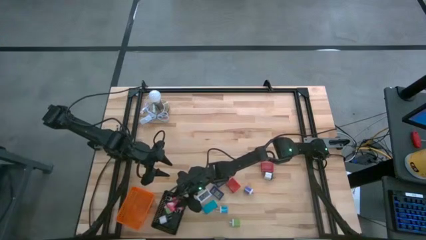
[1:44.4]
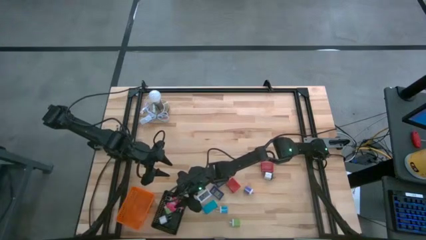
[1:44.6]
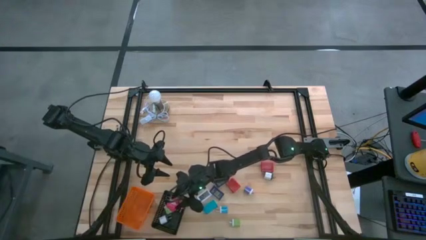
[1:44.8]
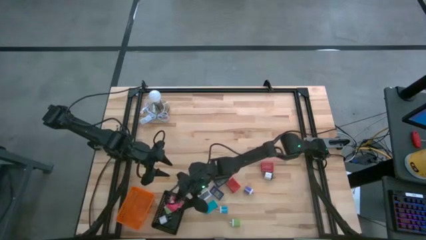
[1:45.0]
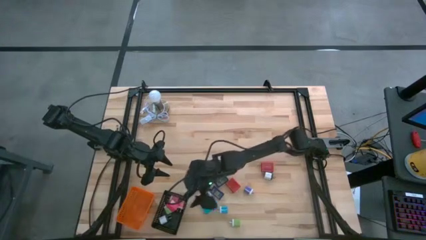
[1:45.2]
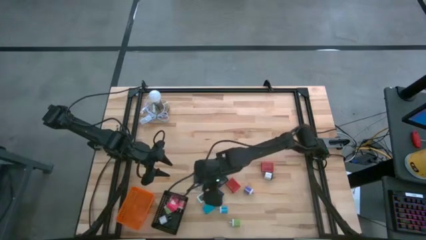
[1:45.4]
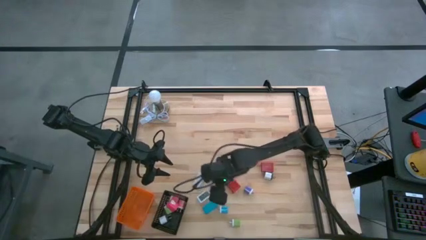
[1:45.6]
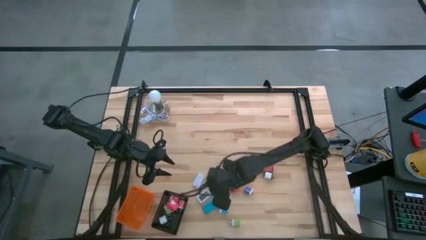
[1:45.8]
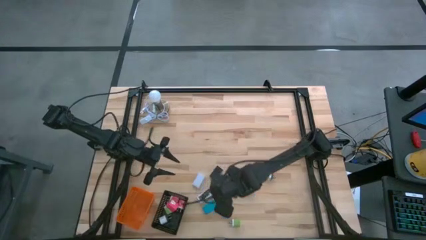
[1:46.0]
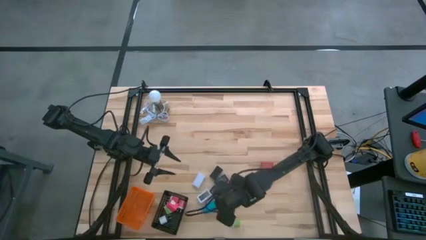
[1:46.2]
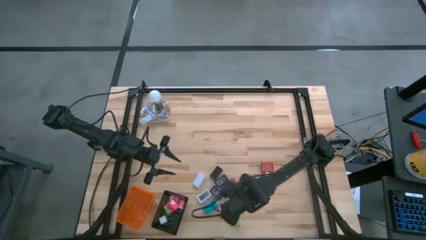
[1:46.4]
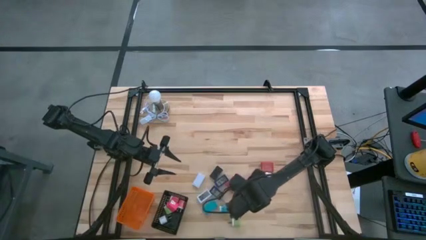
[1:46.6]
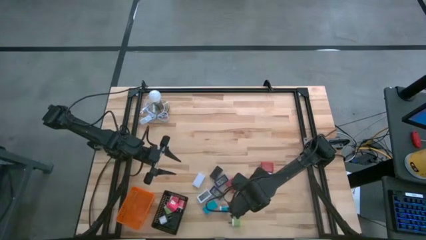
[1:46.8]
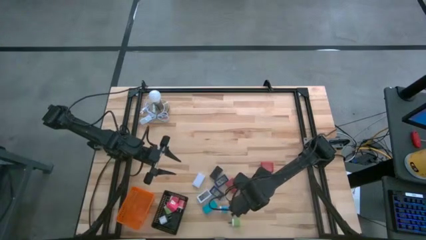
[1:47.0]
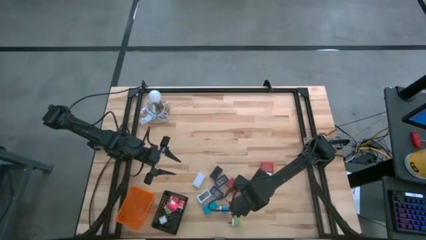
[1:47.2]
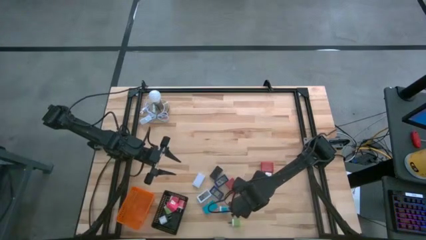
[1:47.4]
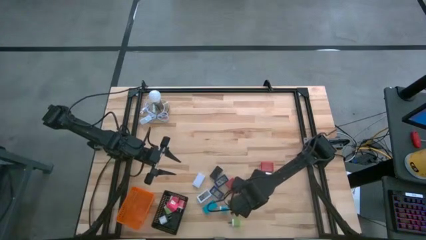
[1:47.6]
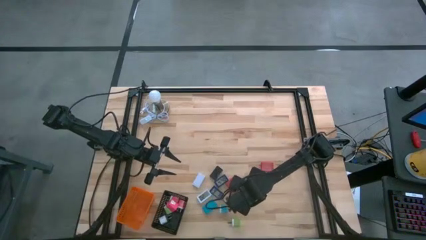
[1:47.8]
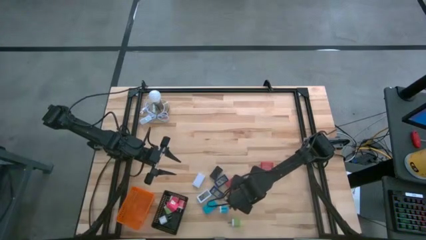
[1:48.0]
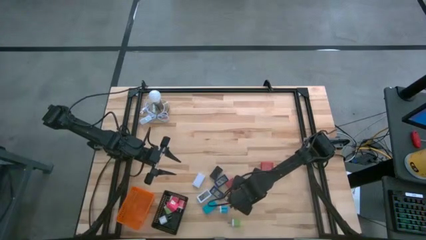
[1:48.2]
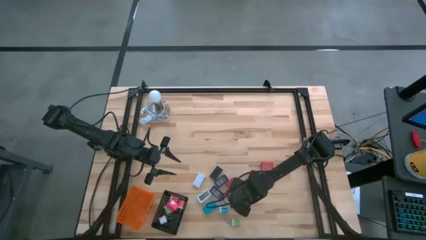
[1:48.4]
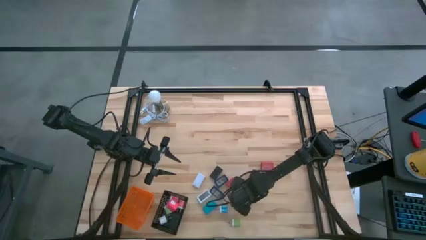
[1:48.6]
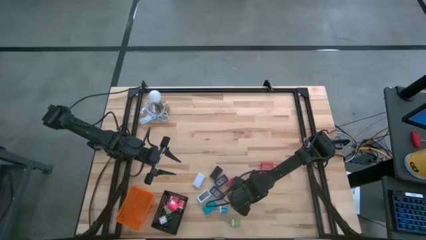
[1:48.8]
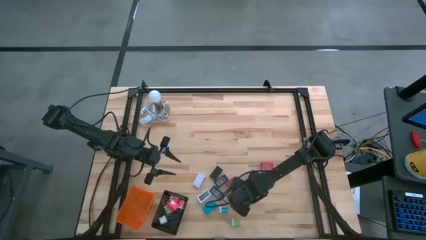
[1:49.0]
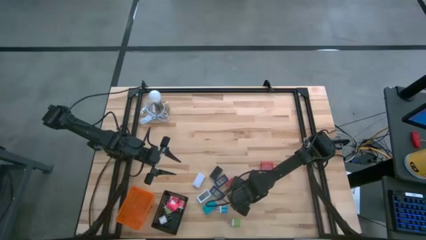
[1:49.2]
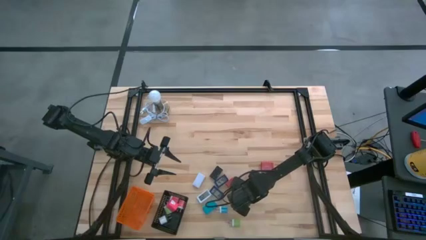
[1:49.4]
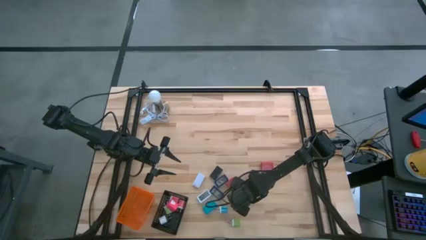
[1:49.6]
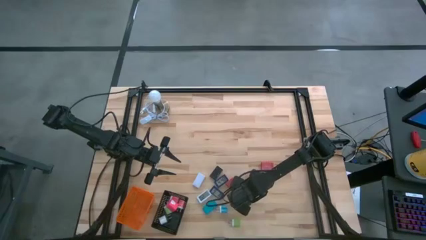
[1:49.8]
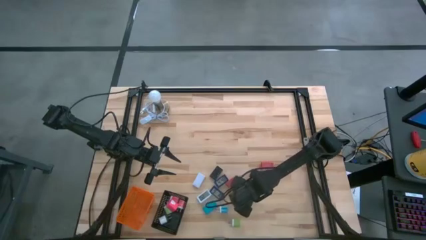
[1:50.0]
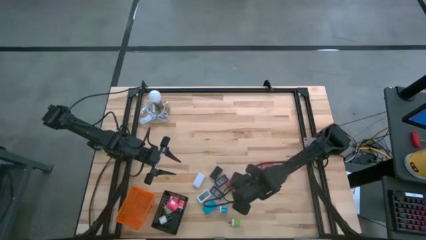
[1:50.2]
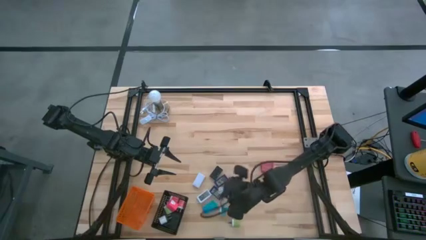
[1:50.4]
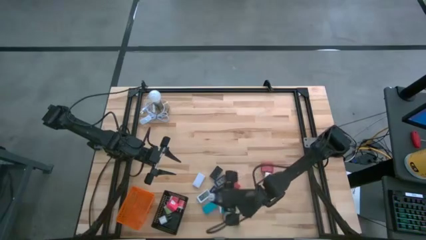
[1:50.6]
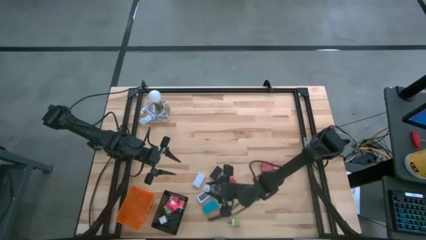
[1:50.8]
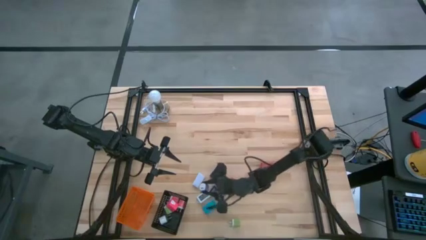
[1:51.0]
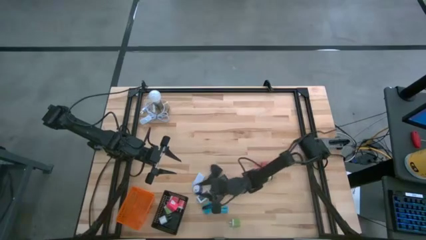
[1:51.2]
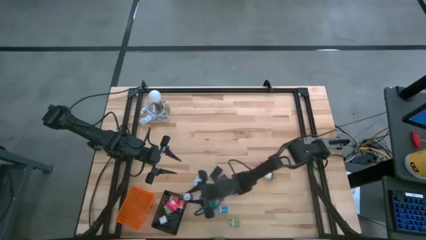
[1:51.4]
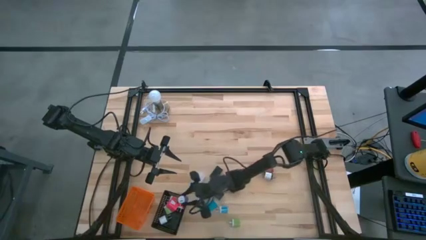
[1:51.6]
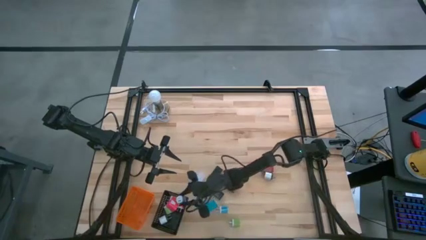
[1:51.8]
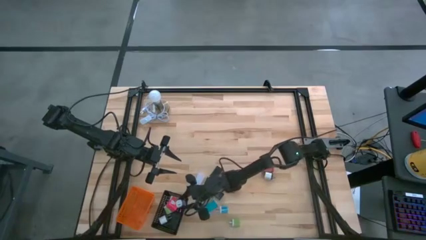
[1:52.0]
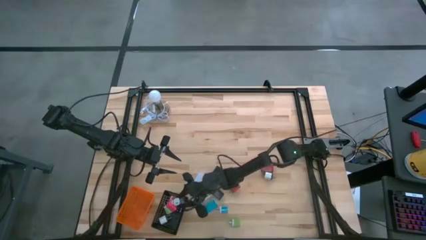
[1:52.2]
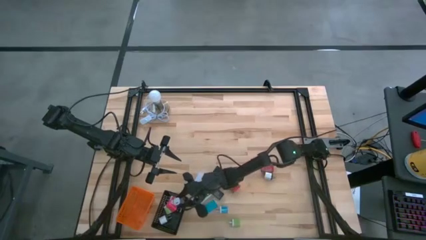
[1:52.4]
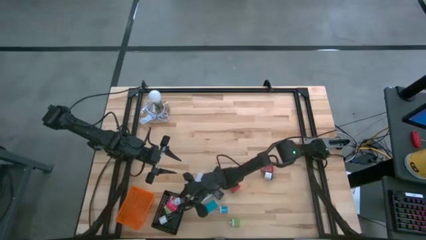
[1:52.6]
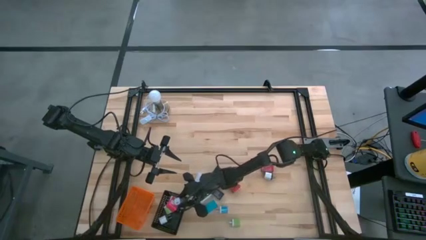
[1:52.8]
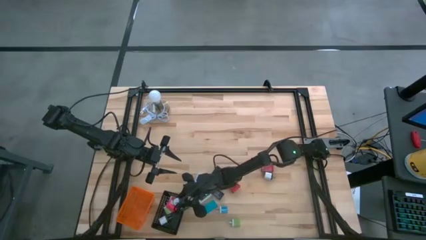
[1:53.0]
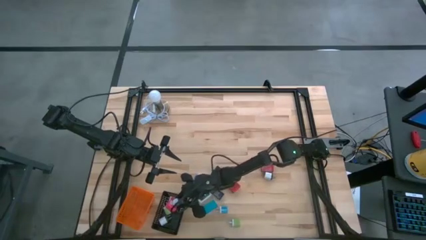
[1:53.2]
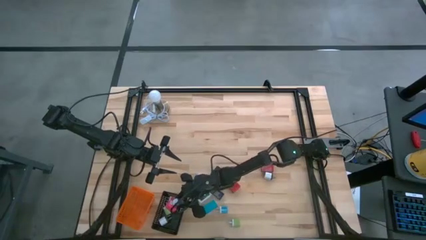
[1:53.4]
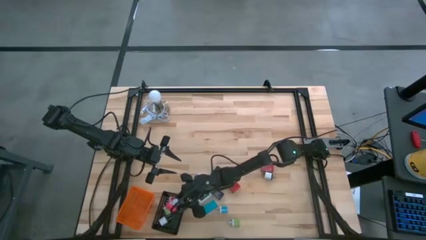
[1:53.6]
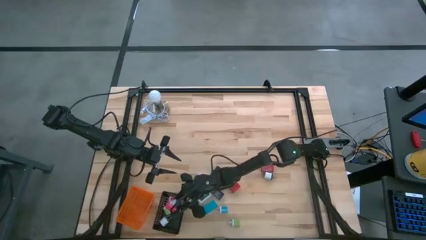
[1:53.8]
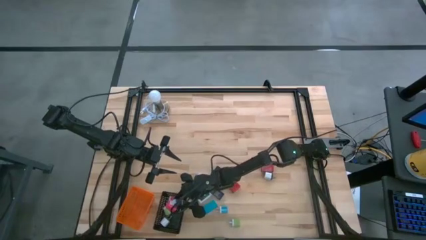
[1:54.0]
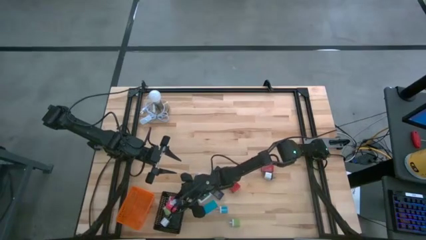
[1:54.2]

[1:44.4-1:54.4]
Task: Pick & Place Office items
Put the purple charger adapter into the black basket

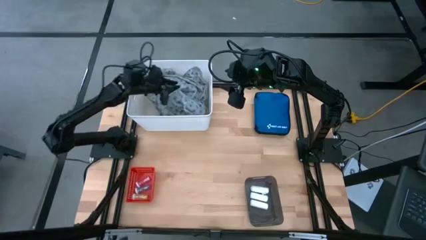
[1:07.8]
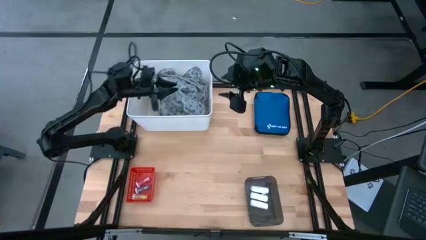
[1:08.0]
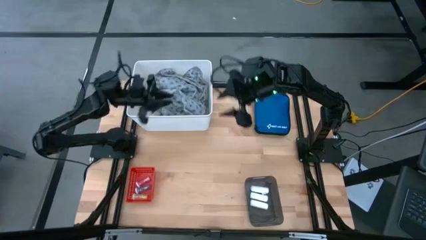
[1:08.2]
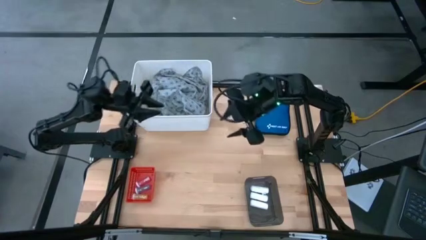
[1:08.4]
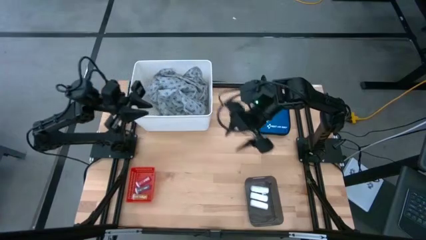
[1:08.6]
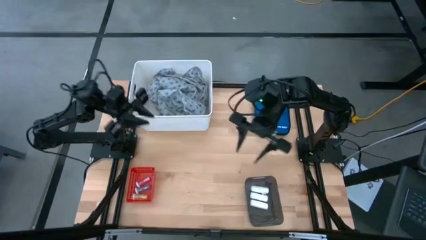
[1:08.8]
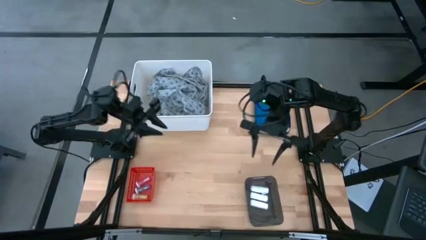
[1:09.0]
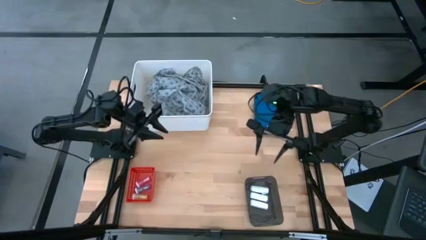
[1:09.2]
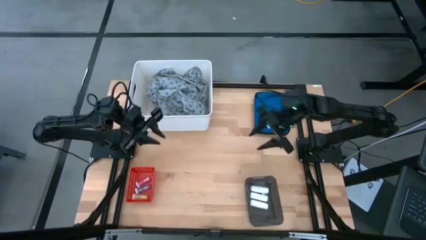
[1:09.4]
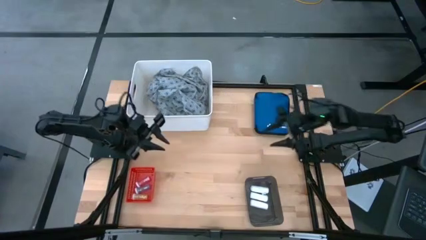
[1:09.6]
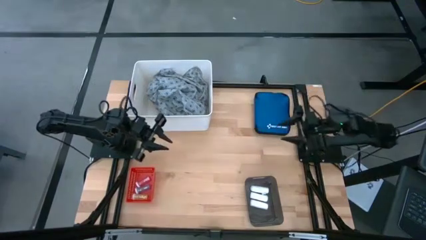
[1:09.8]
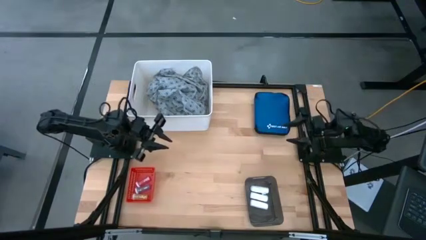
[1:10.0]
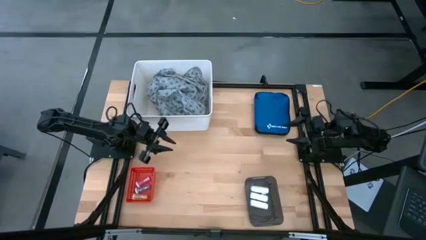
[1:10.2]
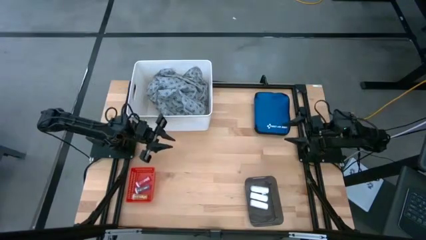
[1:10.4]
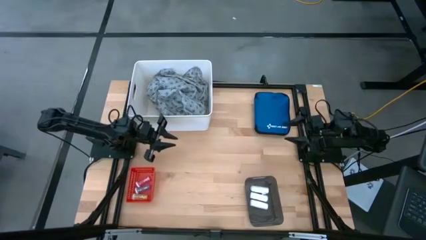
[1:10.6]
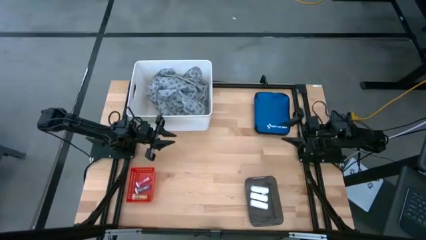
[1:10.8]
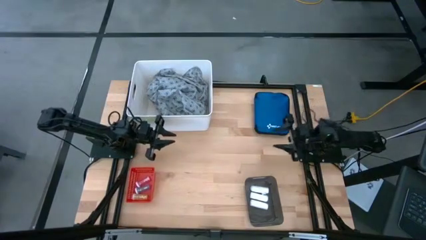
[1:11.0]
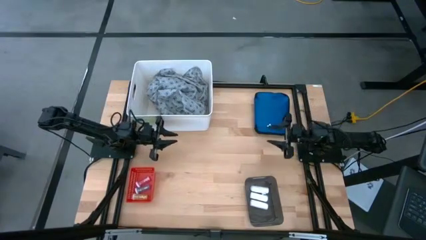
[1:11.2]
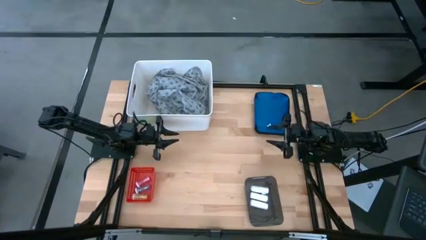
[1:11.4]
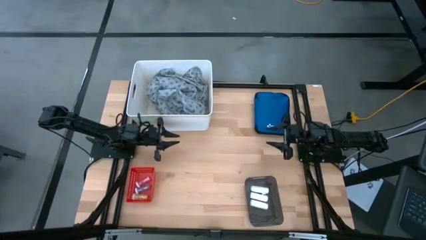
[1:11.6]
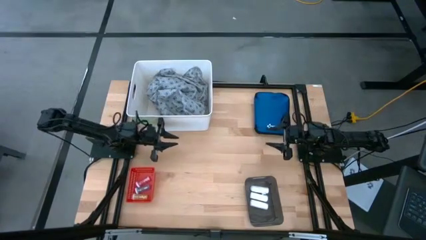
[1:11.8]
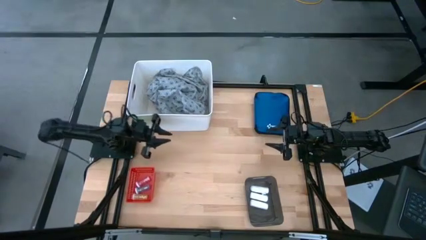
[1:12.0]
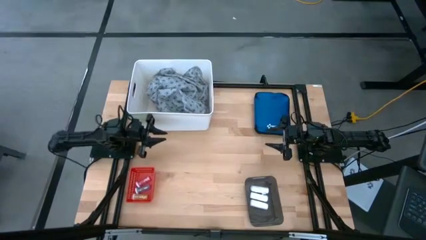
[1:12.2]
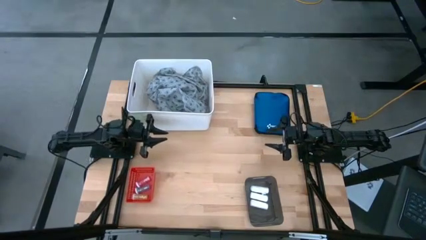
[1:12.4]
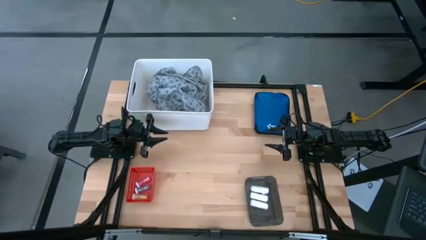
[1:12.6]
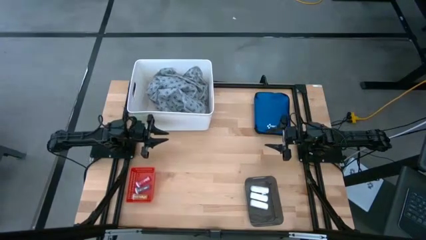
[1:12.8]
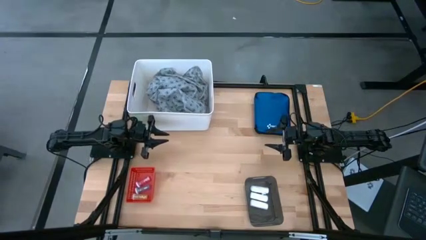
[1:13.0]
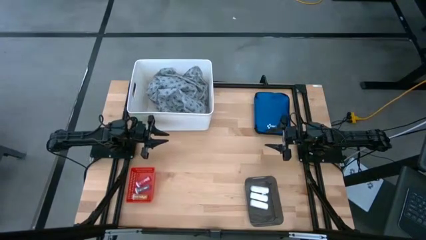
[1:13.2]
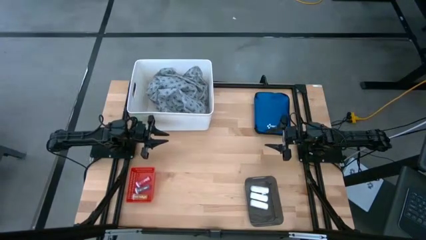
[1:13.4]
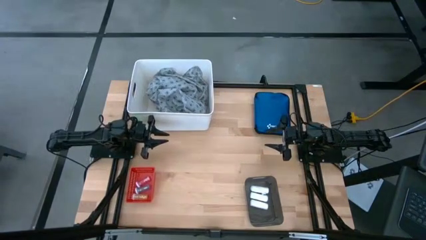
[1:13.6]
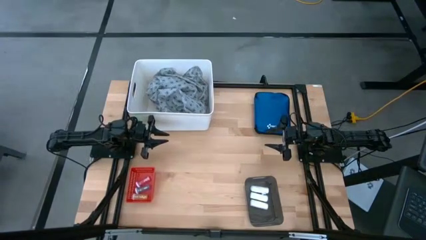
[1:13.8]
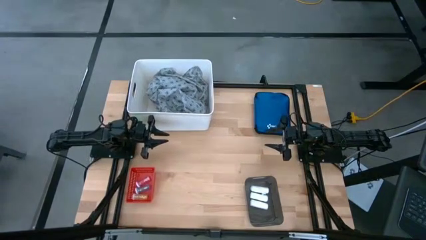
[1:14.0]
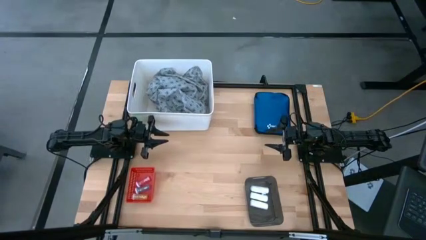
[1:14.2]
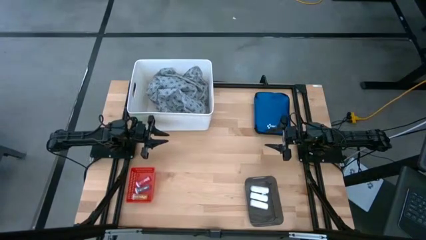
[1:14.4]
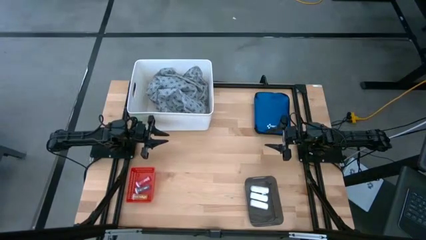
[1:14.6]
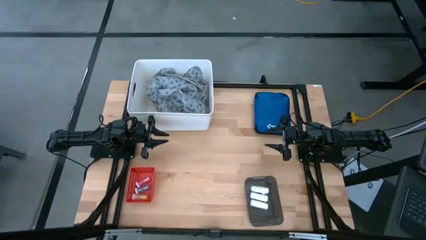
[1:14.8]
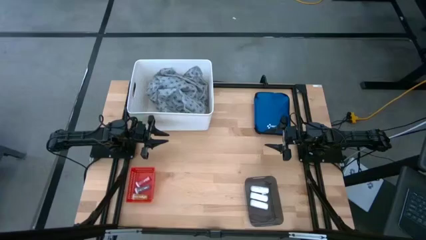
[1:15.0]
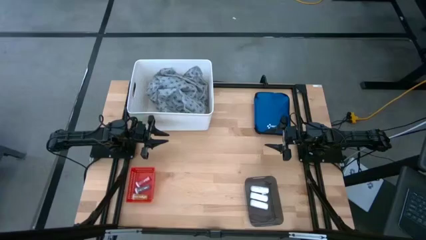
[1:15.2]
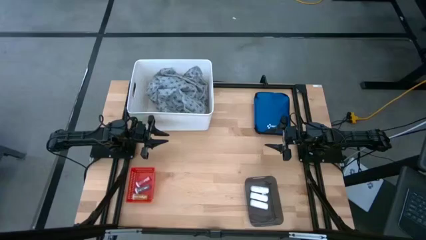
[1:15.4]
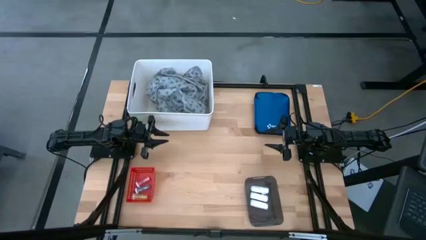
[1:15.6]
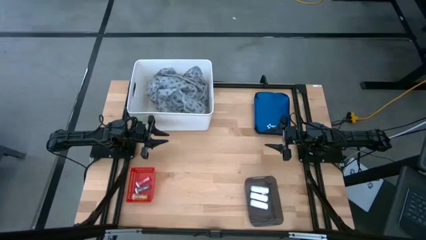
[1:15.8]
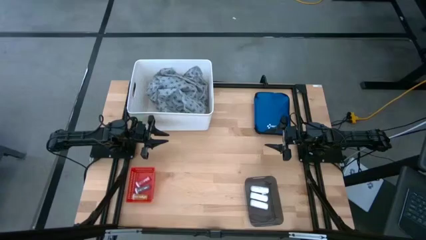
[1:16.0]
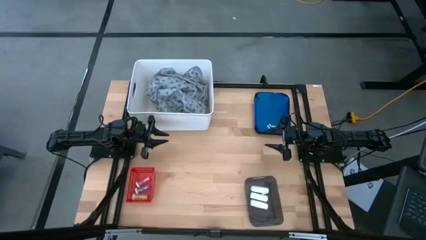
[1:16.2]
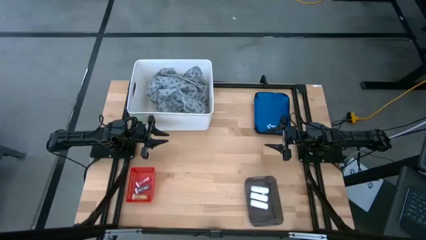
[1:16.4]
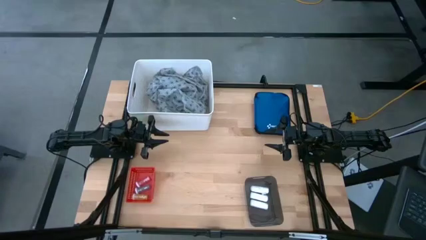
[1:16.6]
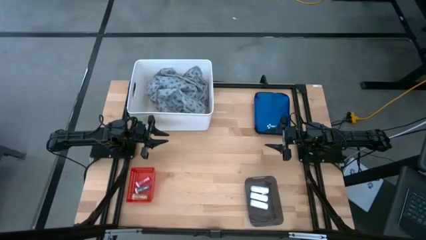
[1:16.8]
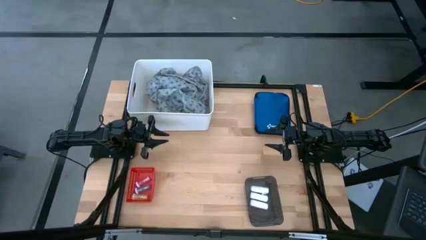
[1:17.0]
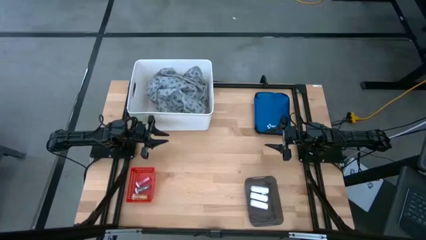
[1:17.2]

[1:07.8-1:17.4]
Task: Pick & Place Medicine items
Return to Home Position
